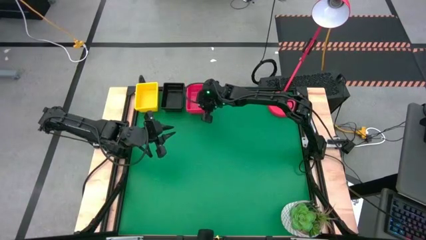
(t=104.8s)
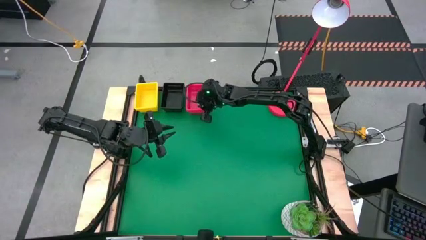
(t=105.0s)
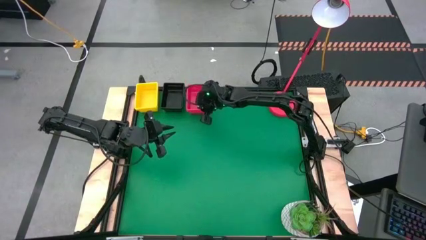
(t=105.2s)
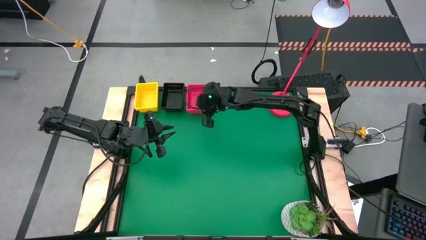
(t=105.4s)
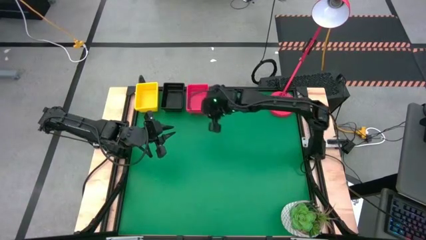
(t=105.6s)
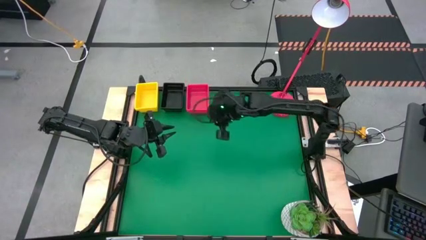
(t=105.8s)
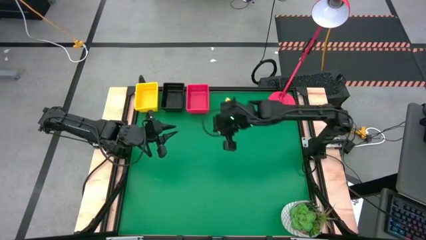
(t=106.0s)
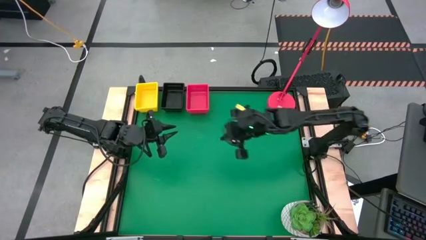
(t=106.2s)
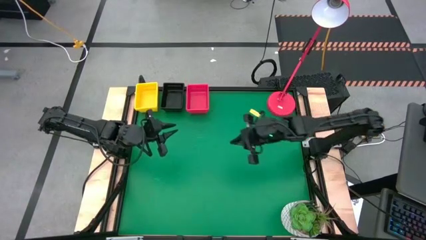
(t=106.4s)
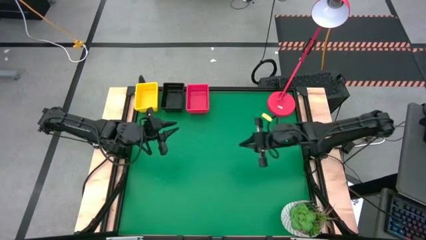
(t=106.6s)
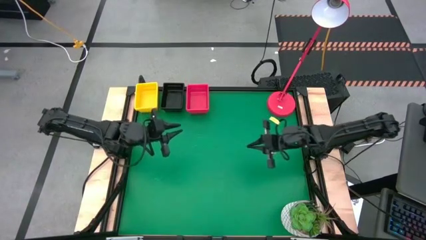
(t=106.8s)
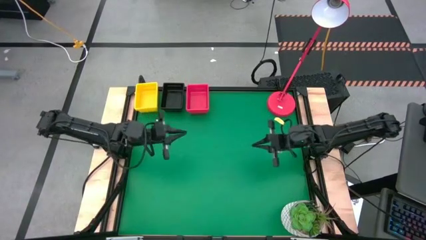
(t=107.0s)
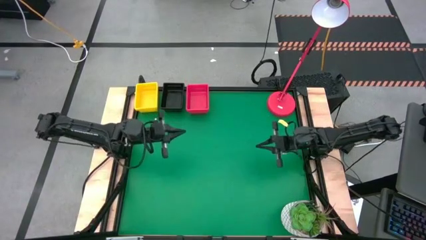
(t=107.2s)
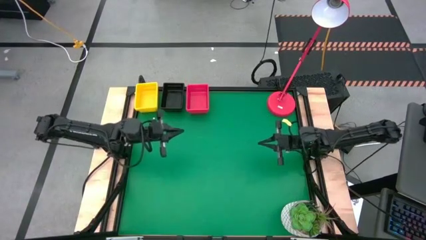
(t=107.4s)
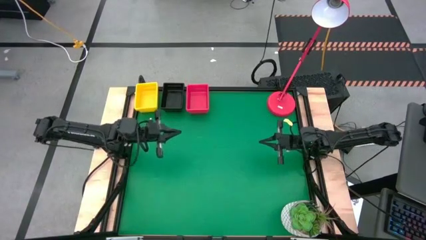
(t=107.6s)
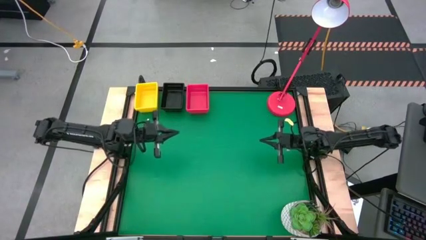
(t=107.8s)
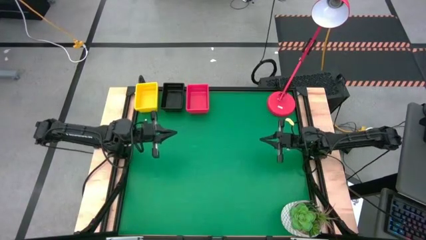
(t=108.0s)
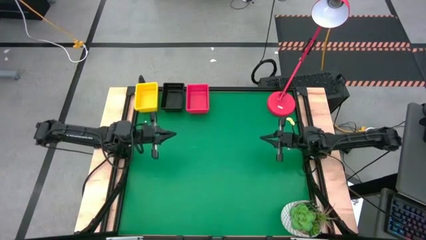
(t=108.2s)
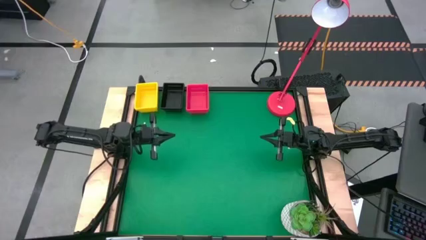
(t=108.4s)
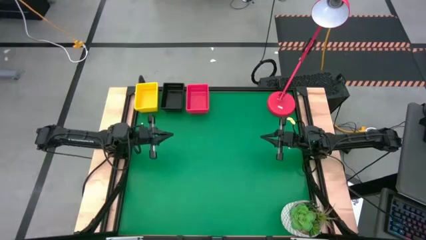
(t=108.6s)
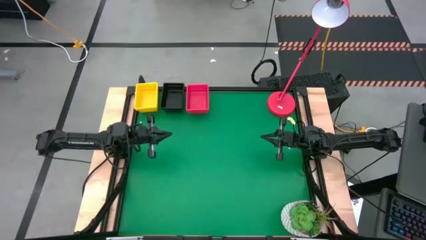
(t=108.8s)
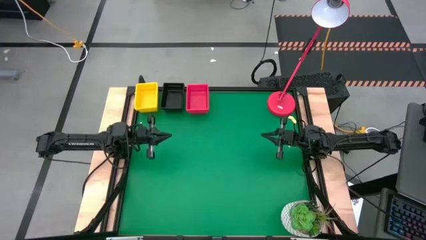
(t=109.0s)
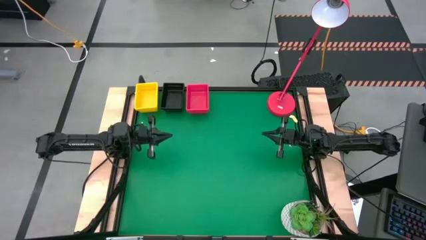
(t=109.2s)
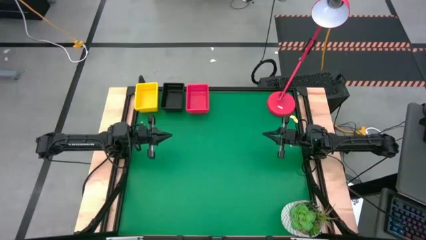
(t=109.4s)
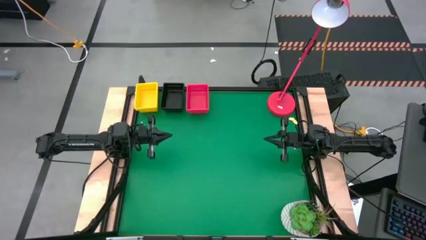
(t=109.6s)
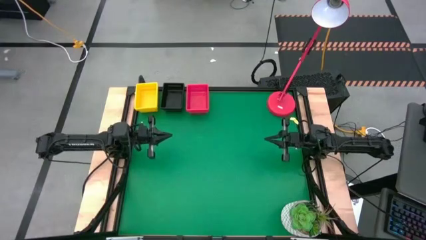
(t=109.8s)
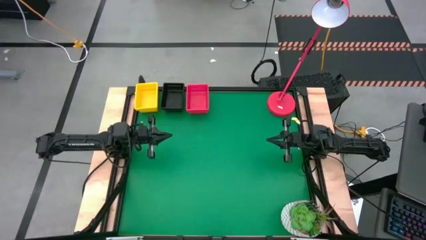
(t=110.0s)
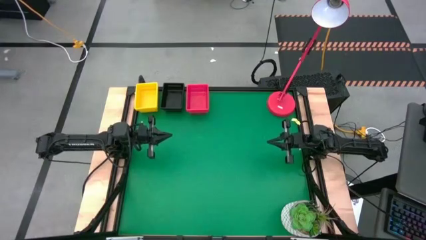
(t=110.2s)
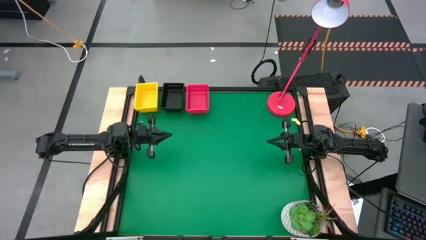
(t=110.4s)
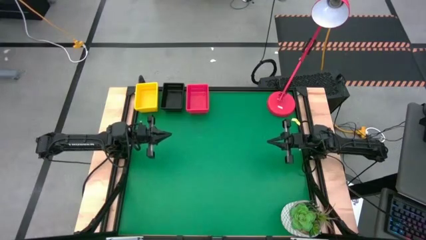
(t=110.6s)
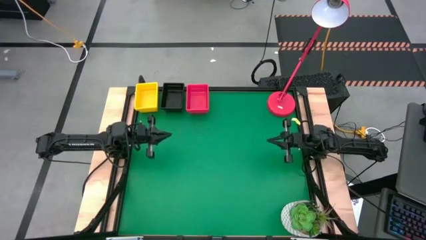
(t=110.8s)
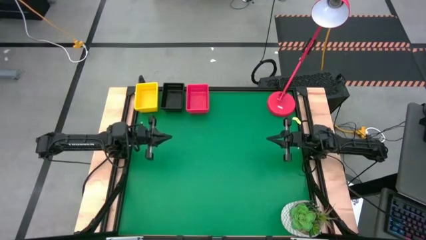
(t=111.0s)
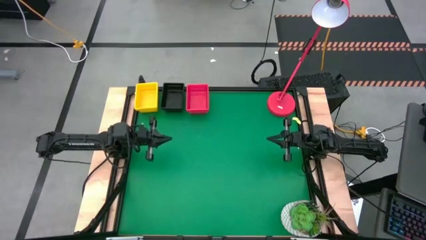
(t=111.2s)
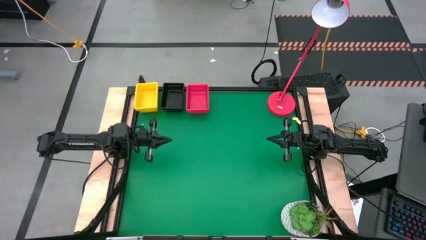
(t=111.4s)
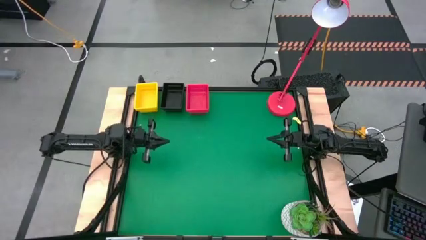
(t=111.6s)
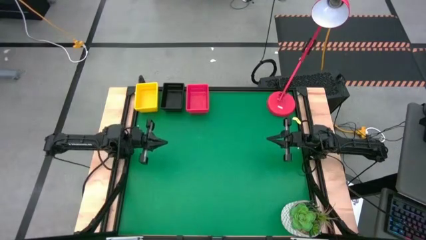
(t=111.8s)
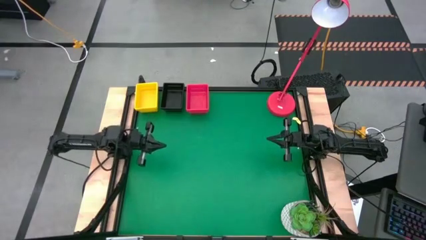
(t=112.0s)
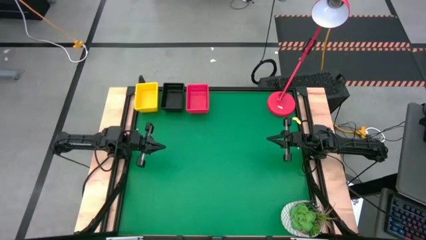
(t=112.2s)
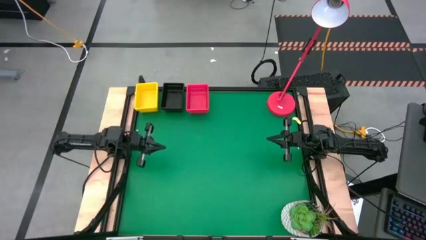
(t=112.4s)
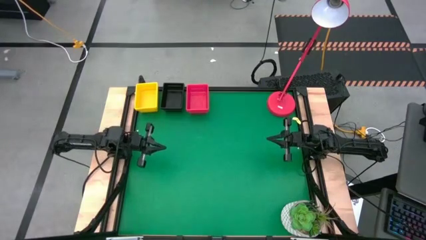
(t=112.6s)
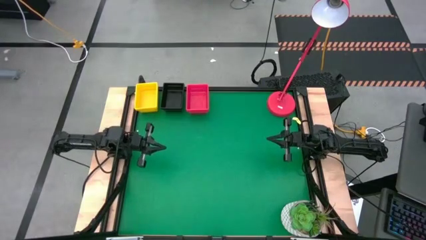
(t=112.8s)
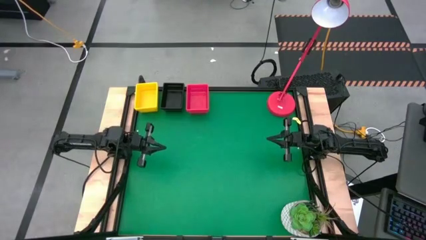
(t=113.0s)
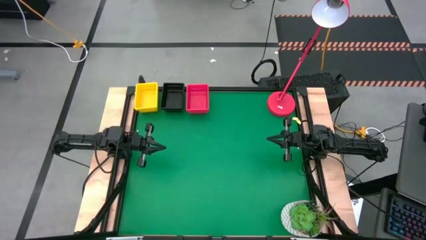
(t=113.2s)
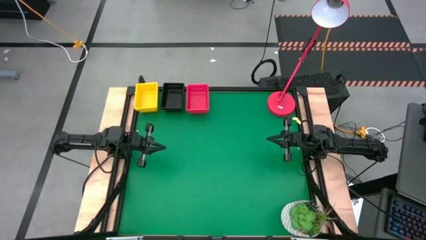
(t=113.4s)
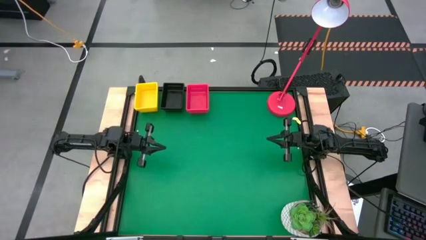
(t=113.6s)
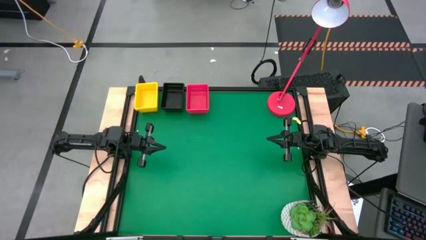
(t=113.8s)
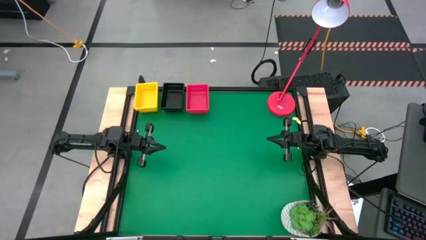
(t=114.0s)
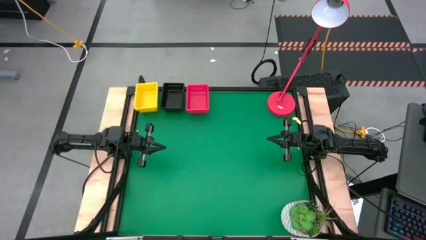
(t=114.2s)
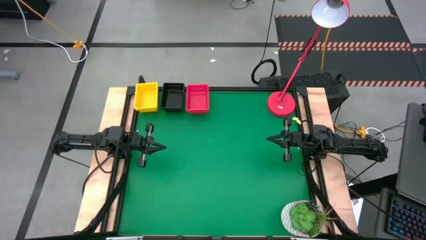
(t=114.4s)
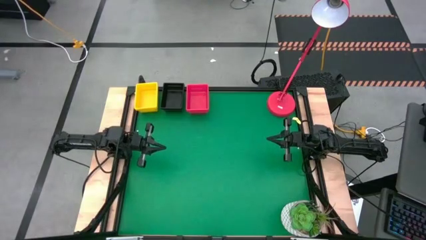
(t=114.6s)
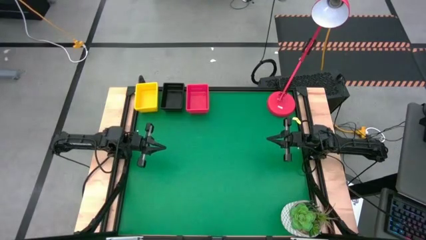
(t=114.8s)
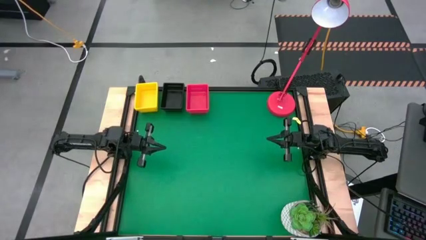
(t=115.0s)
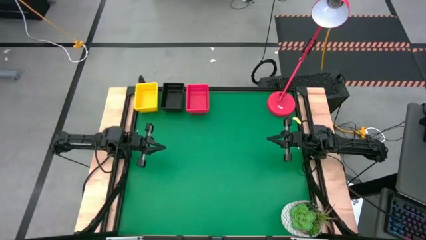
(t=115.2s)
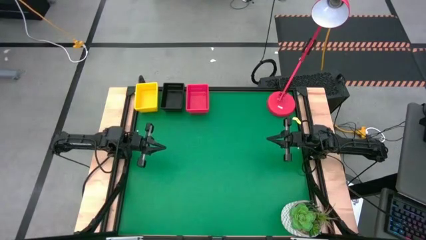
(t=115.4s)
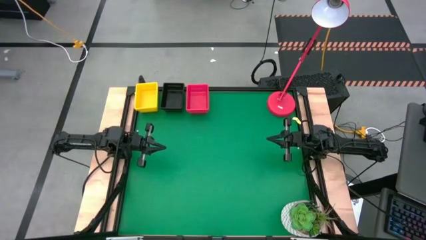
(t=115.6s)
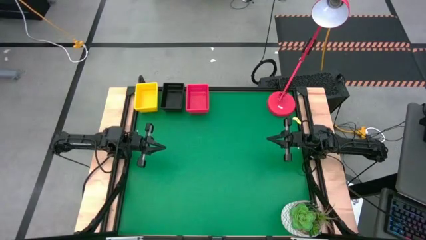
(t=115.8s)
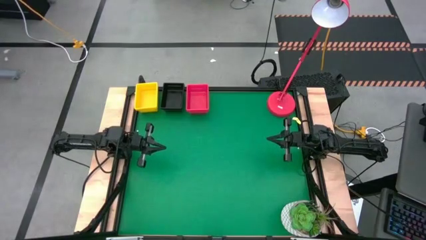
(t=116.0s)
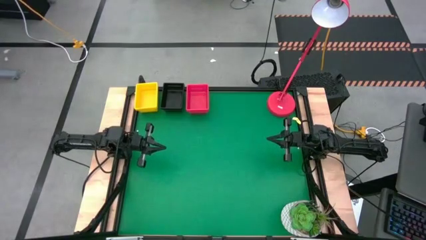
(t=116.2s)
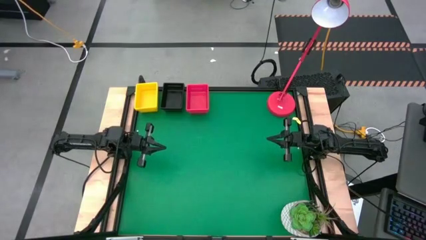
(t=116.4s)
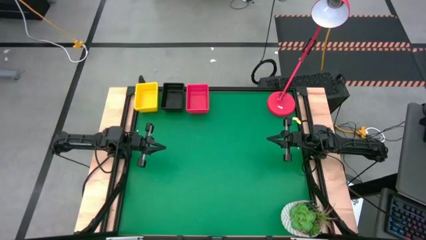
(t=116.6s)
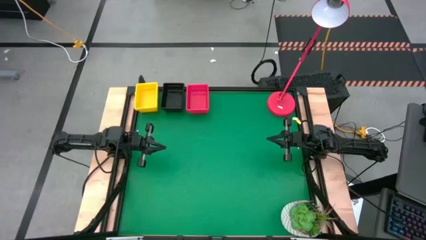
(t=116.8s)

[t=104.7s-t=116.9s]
Return to Home Position
